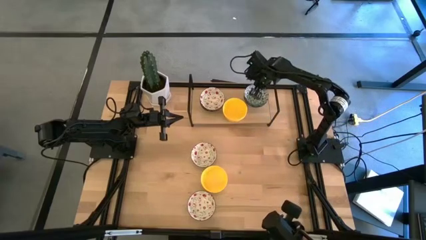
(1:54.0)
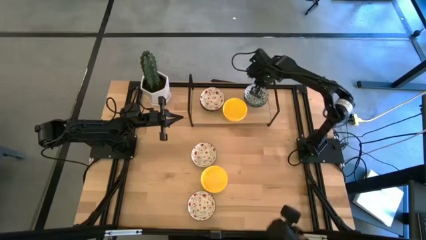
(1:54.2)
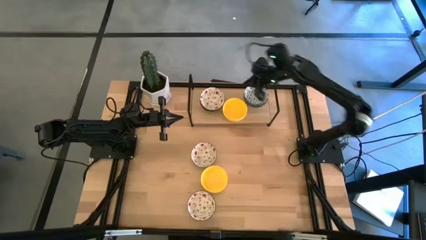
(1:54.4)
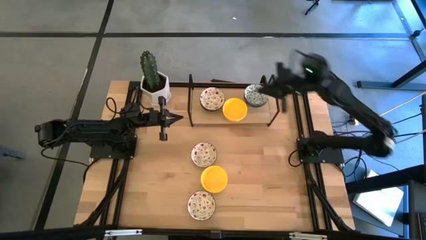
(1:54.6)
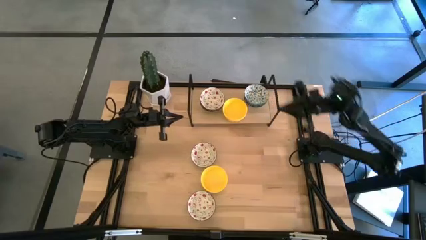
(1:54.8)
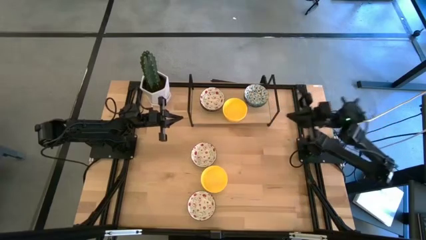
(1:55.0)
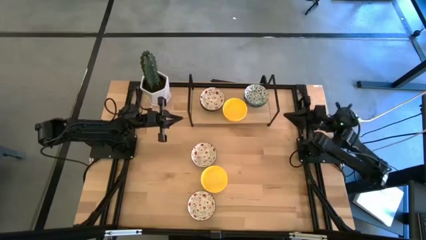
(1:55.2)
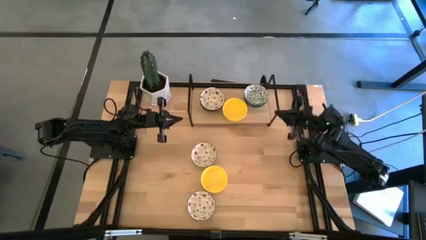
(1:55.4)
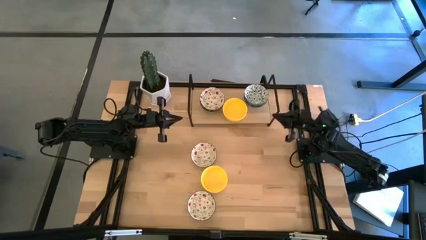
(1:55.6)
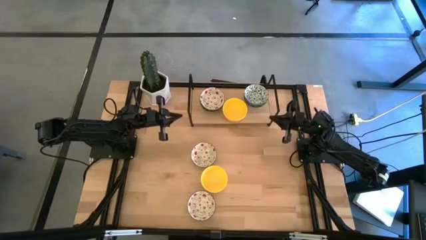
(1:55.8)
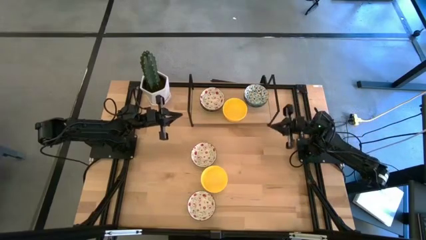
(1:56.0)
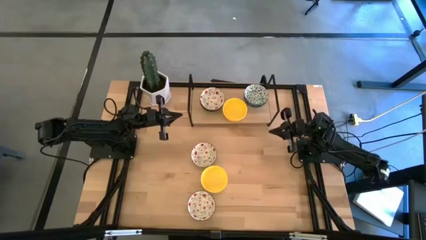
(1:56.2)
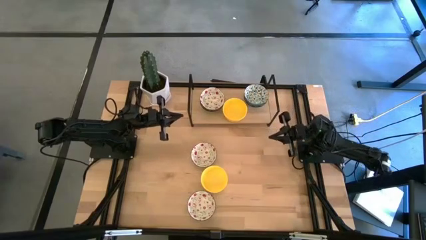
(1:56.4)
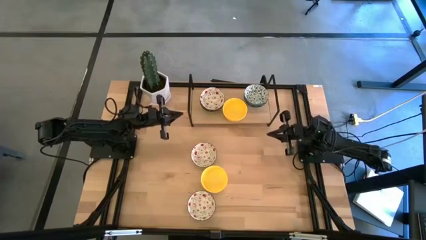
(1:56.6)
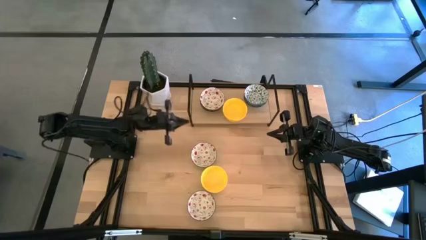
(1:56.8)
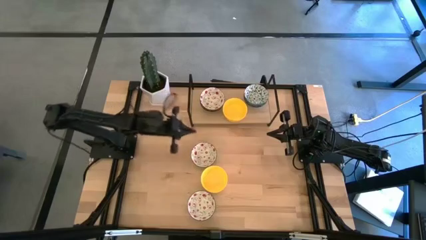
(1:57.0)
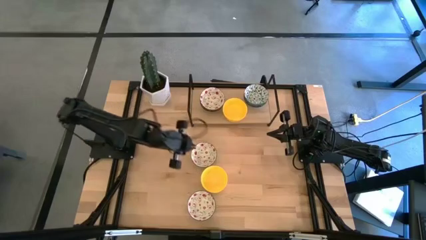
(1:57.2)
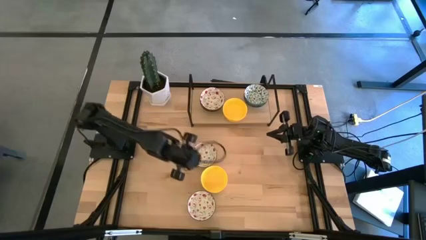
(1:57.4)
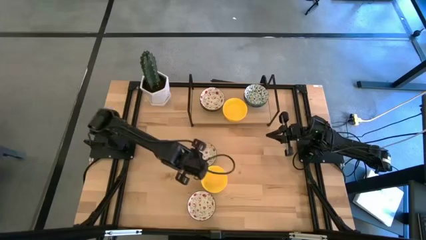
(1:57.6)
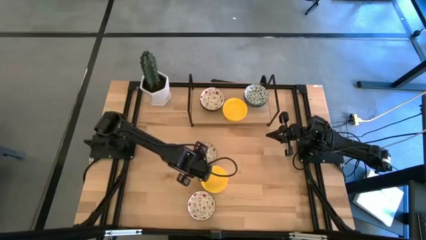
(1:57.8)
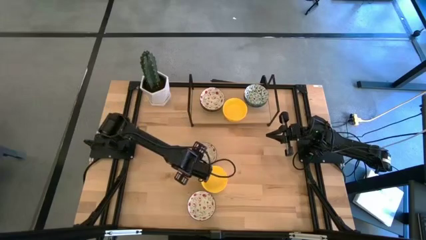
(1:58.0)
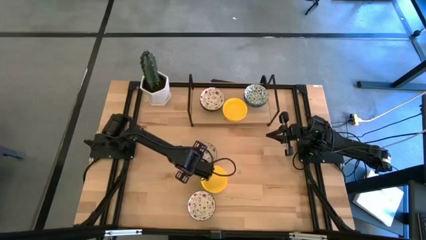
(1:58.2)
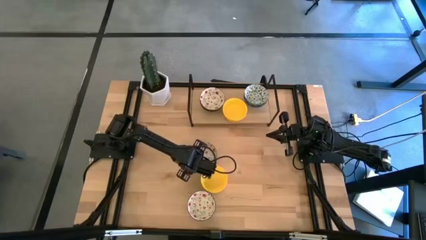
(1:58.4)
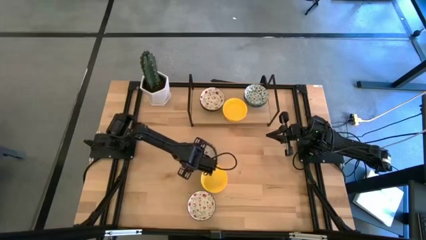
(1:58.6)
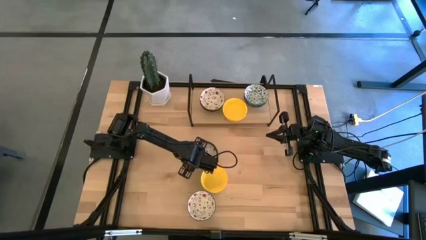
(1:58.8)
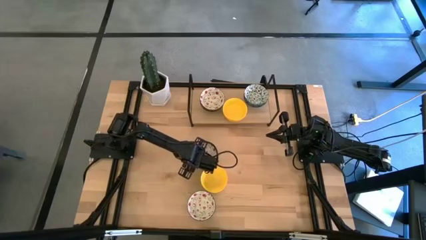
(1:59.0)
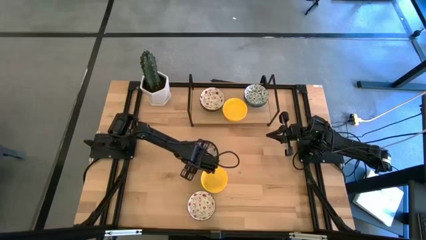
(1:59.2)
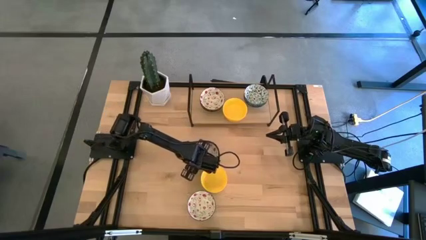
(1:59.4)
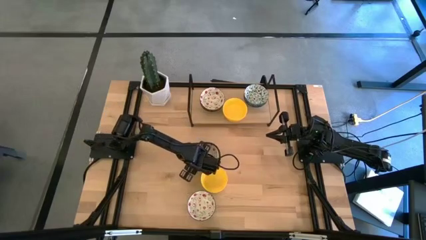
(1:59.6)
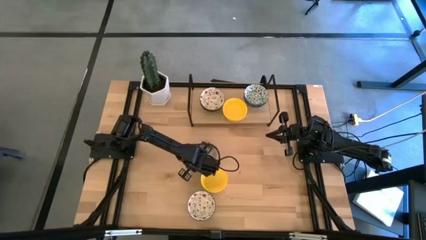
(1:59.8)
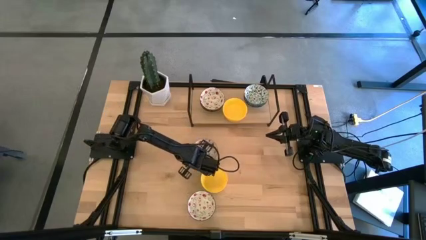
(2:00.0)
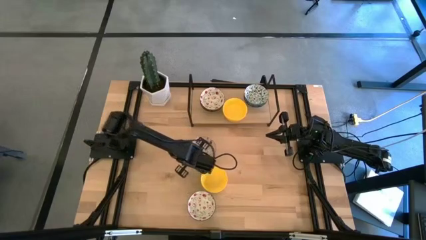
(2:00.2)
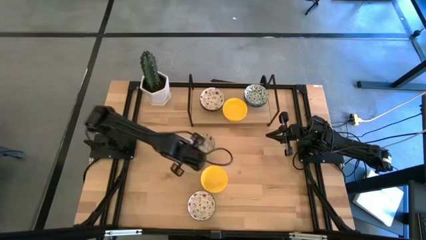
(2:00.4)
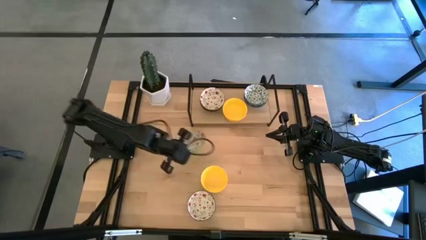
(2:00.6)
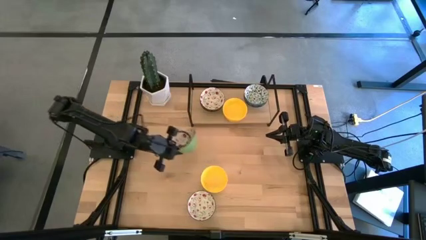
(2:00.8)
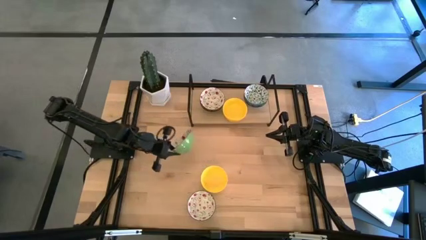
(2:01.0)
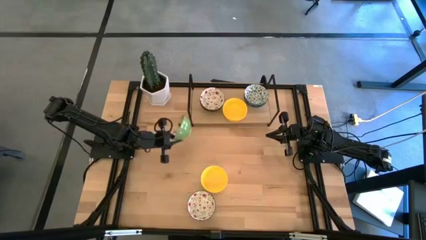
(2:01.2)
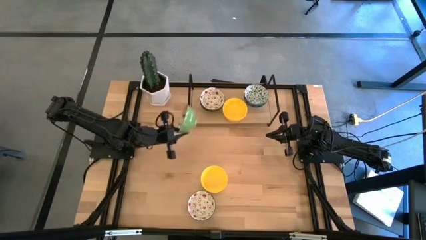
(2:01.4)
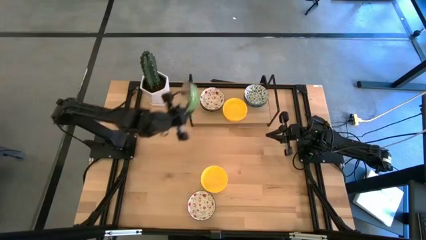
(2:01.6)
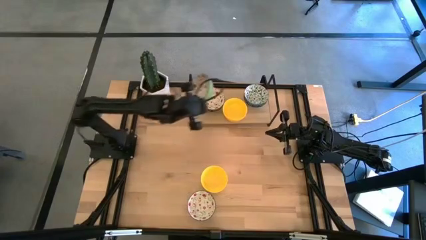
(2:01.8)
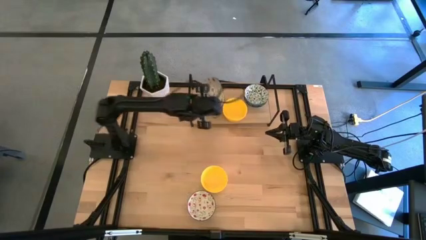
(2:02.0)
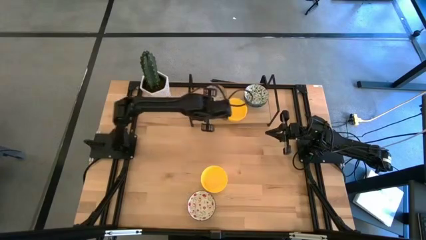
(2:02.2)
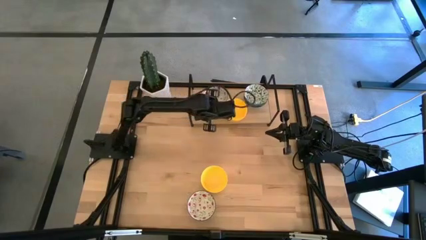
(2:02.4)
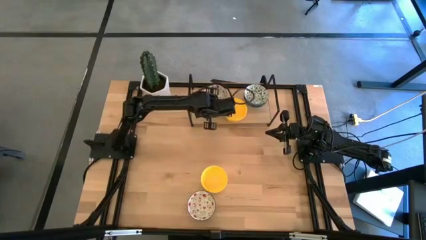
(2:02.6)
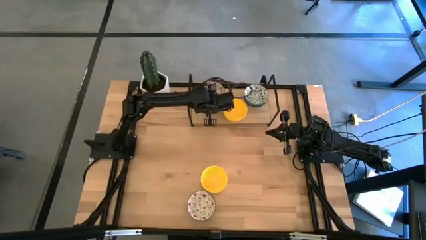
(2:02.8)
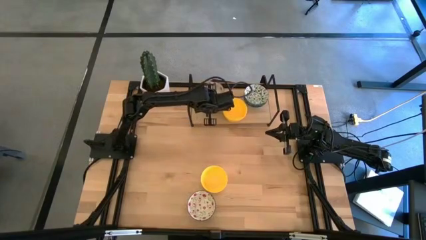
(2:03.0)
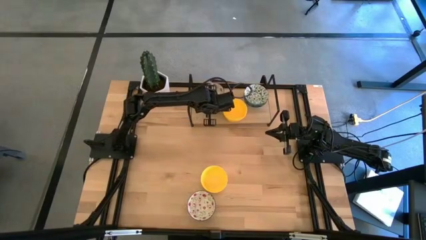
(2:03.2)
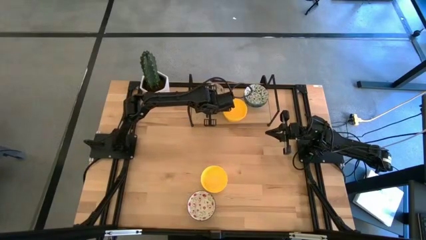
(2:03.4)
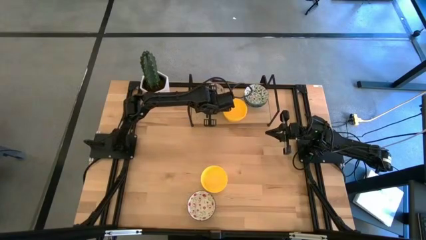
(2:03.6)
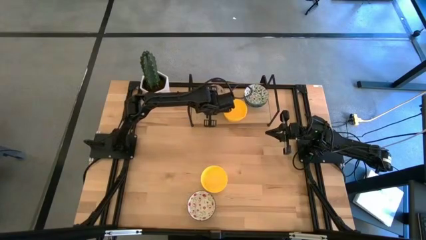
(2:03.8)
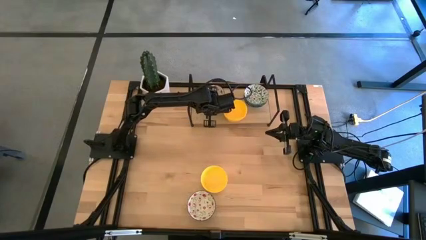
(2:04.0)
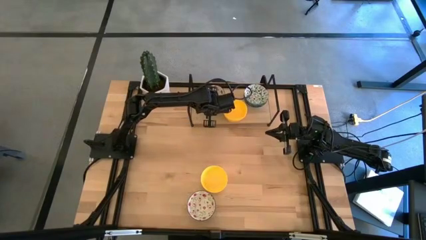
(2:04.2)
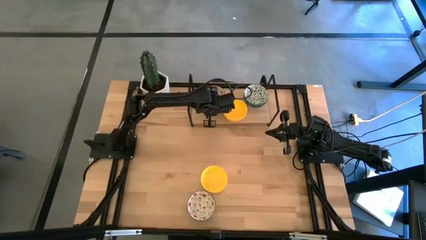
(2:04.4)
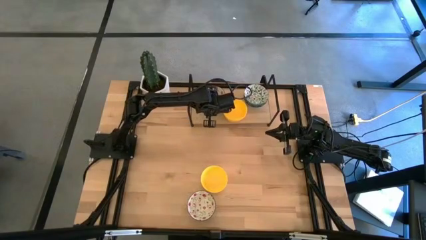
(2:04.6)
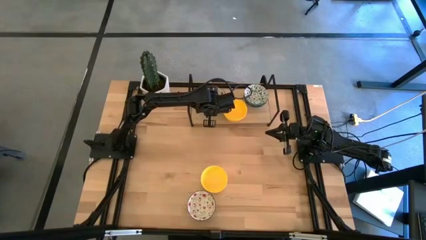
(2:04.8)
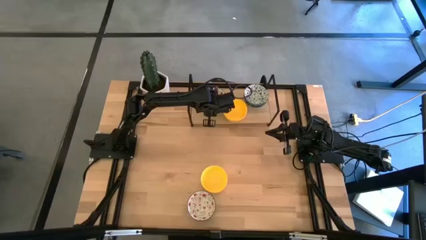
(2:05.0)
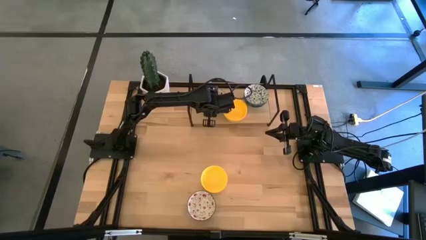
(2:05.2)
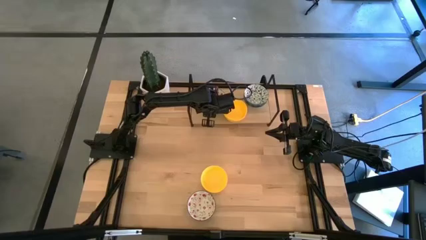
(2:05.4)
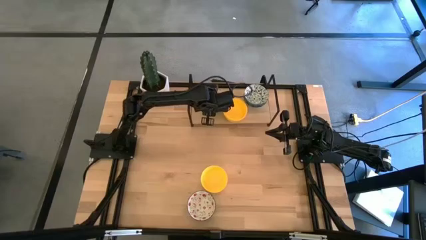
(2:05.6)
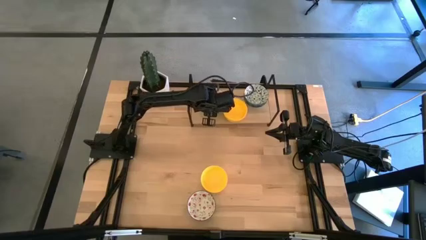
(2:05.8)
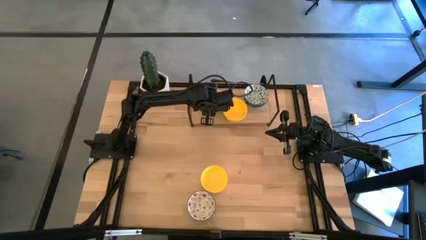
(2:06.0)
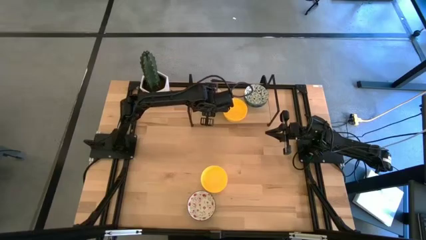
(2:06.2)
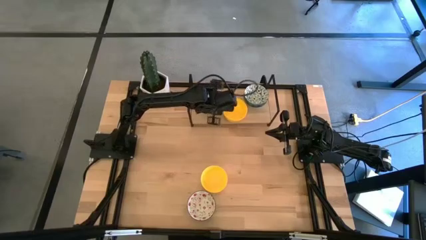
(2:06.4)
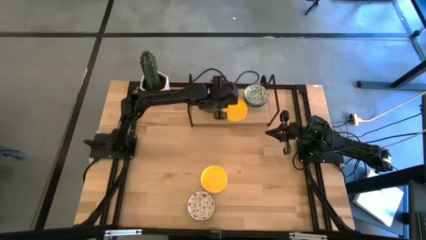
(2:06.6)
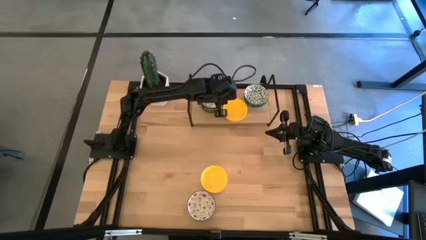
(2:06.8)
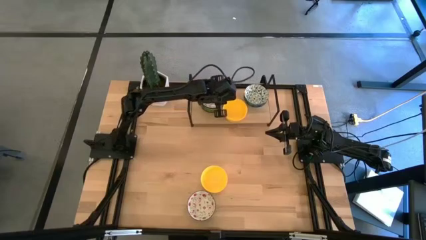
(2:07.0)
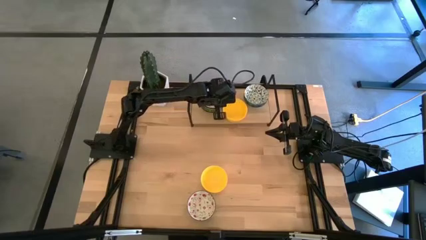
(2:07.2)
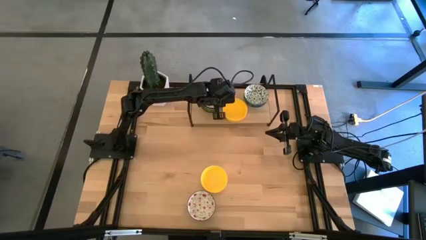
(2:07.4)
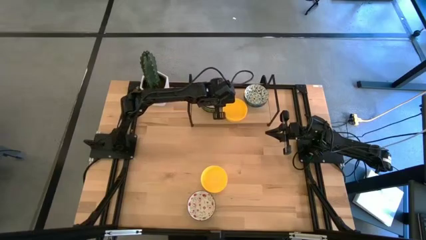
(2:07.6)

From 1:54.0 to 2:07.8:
Task: Pick & Place Mini bowls
Stack the white bowl on top of the white bowl on the shelf
